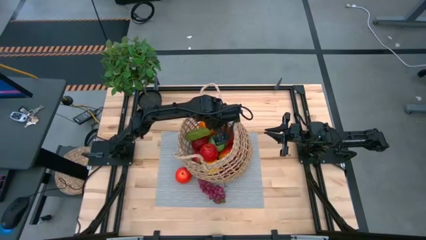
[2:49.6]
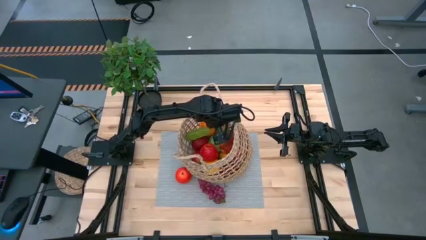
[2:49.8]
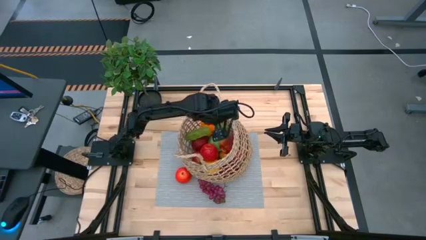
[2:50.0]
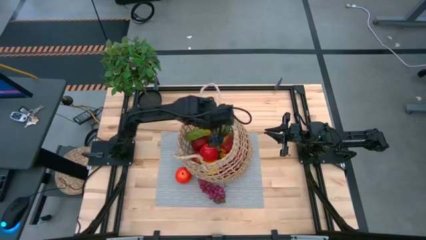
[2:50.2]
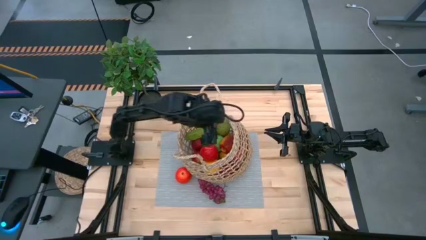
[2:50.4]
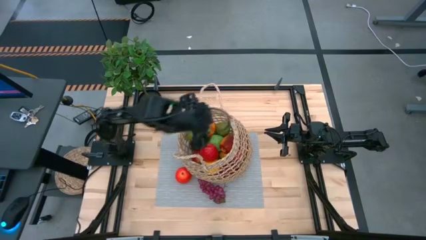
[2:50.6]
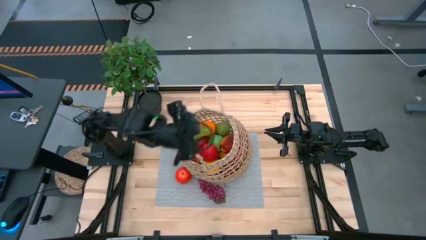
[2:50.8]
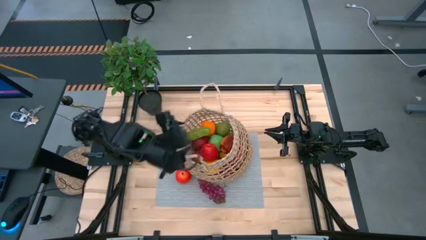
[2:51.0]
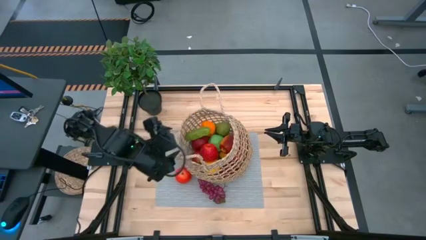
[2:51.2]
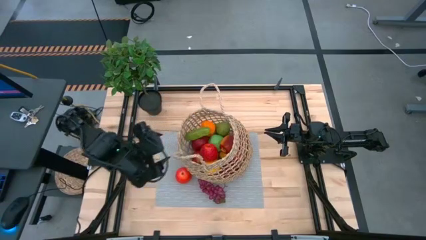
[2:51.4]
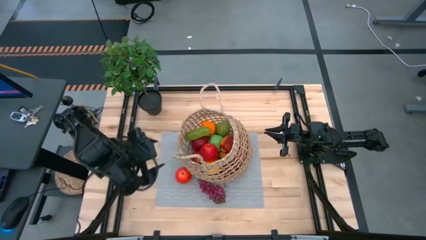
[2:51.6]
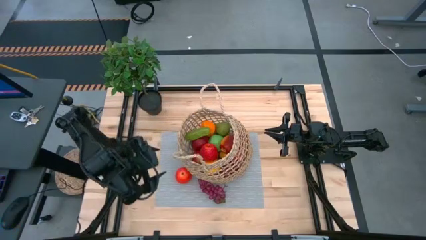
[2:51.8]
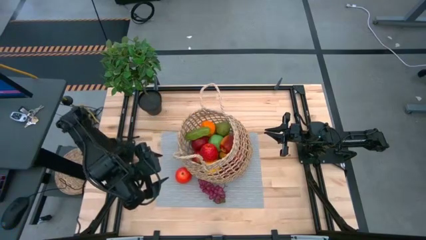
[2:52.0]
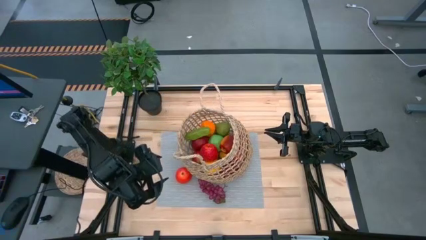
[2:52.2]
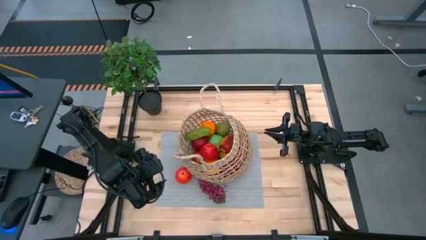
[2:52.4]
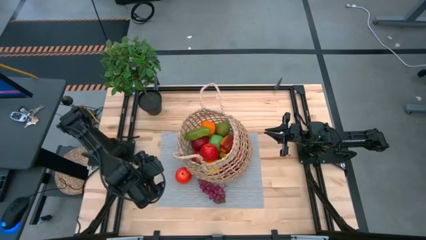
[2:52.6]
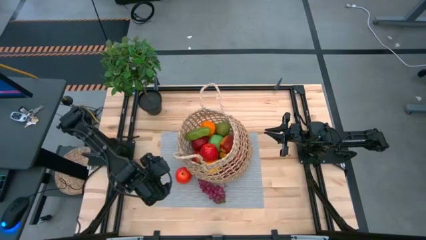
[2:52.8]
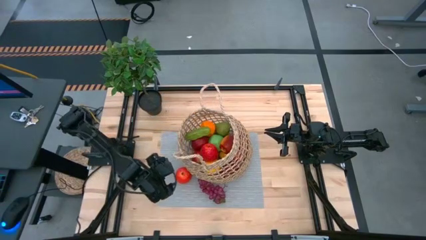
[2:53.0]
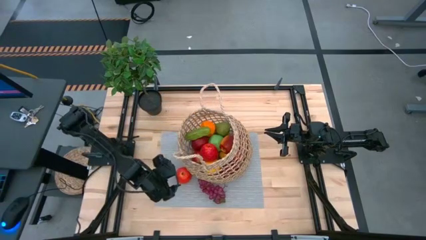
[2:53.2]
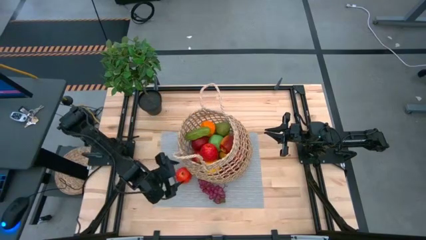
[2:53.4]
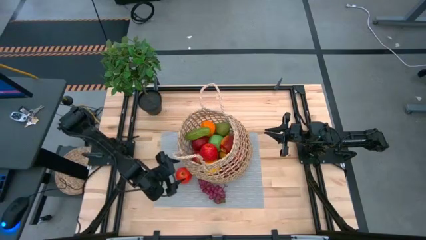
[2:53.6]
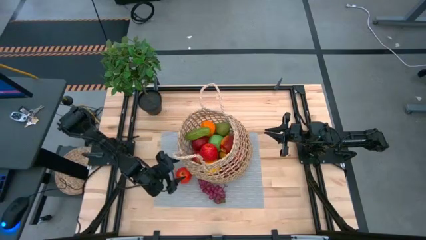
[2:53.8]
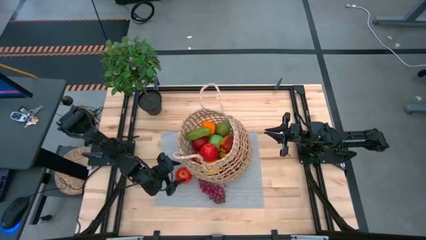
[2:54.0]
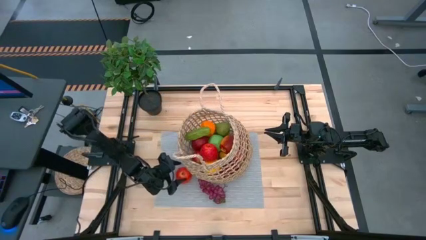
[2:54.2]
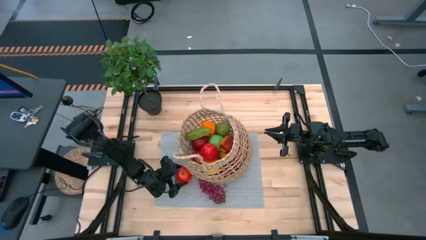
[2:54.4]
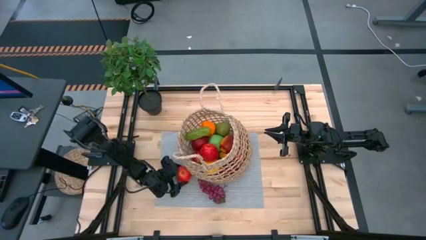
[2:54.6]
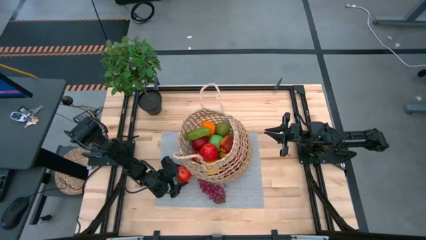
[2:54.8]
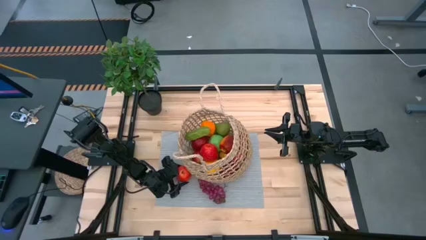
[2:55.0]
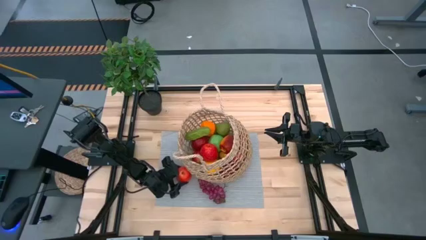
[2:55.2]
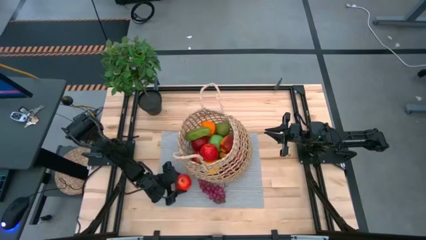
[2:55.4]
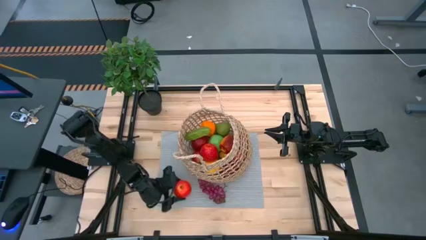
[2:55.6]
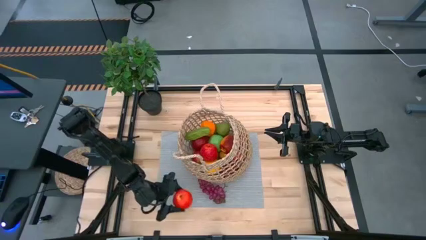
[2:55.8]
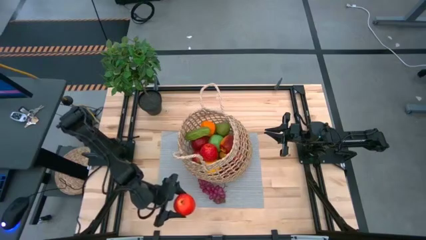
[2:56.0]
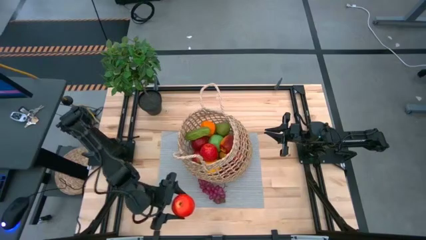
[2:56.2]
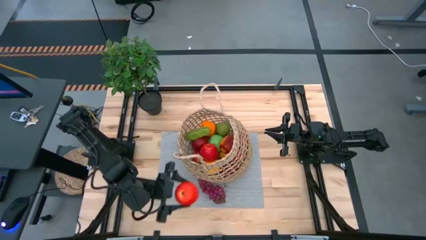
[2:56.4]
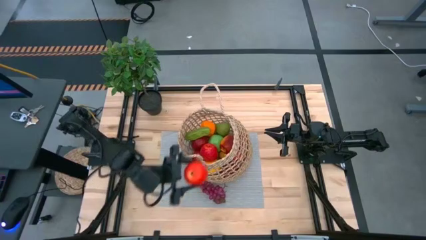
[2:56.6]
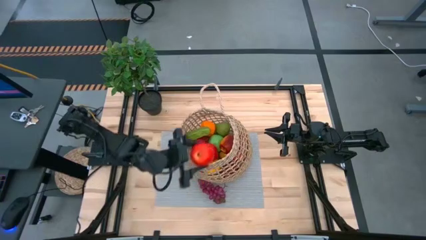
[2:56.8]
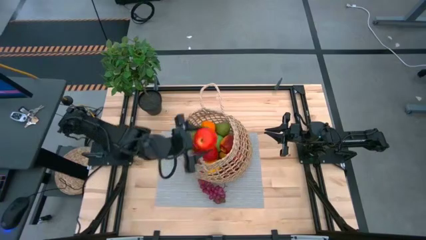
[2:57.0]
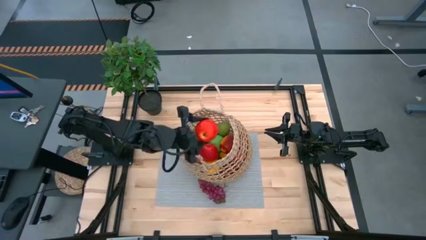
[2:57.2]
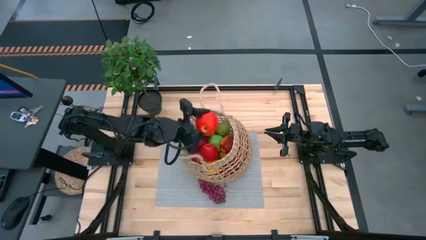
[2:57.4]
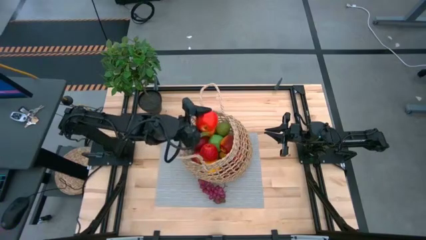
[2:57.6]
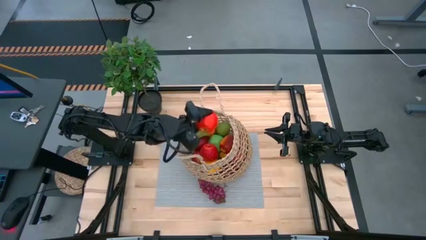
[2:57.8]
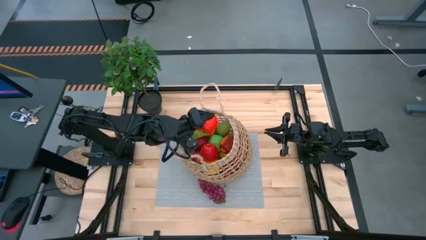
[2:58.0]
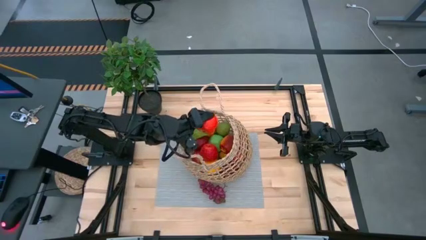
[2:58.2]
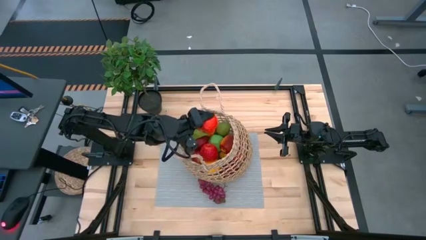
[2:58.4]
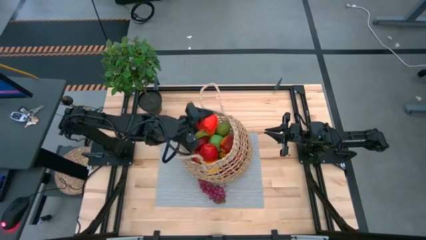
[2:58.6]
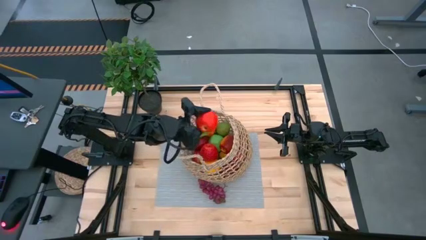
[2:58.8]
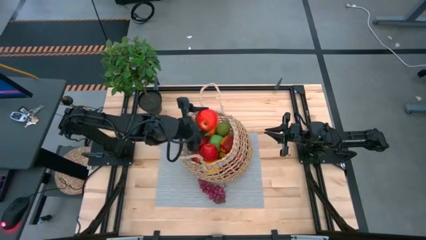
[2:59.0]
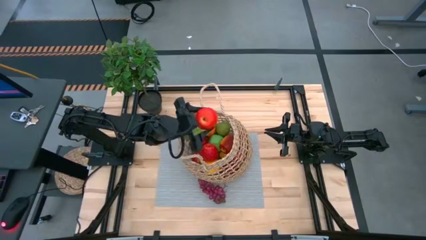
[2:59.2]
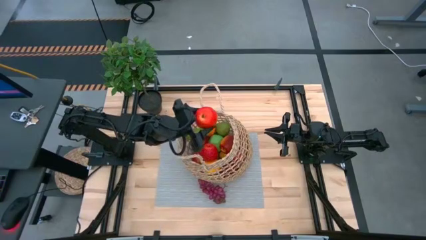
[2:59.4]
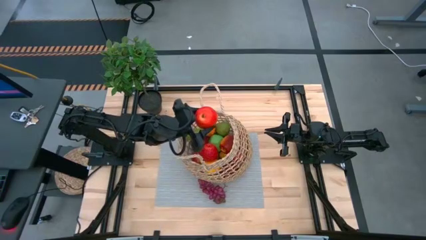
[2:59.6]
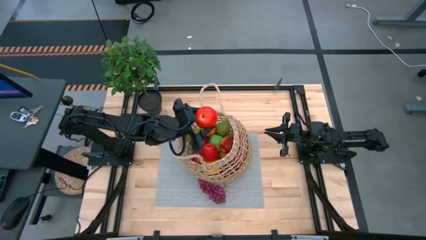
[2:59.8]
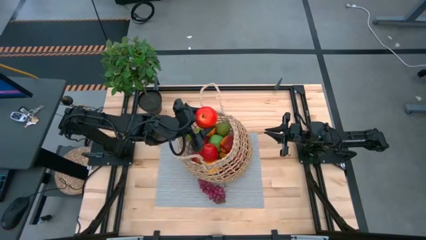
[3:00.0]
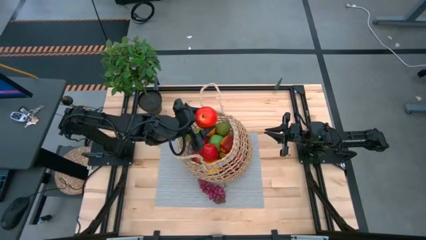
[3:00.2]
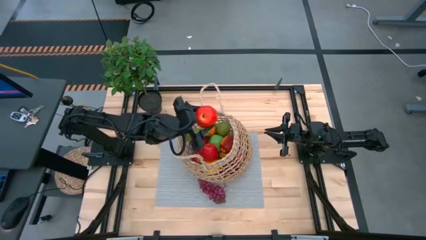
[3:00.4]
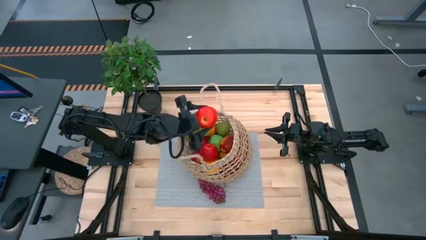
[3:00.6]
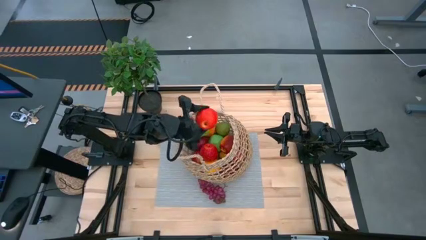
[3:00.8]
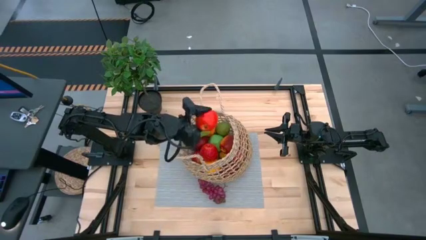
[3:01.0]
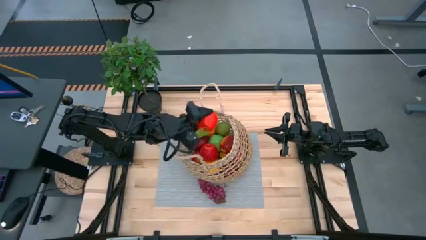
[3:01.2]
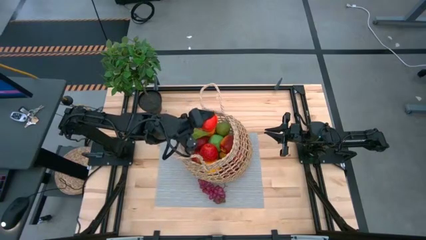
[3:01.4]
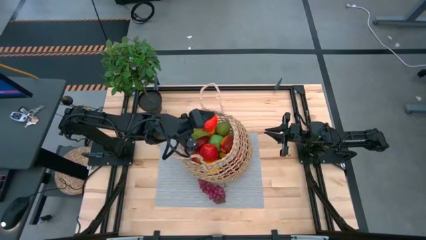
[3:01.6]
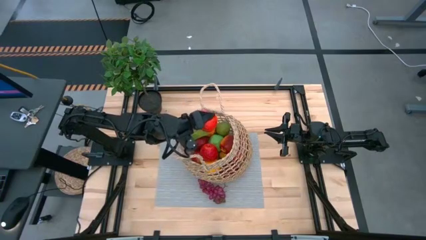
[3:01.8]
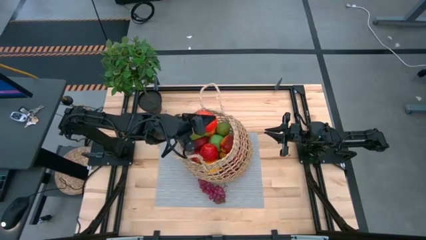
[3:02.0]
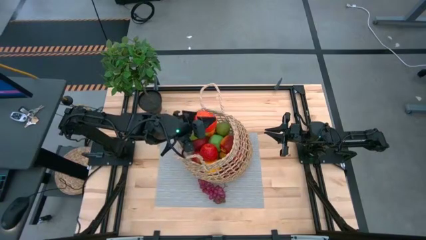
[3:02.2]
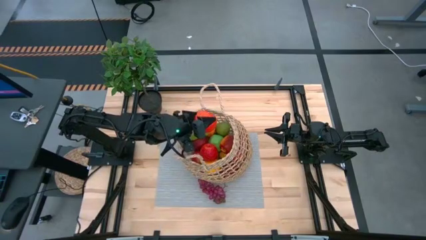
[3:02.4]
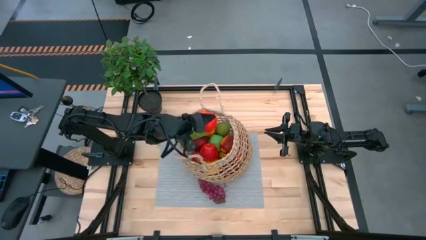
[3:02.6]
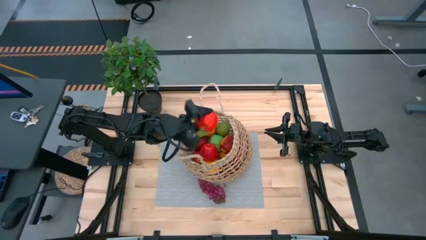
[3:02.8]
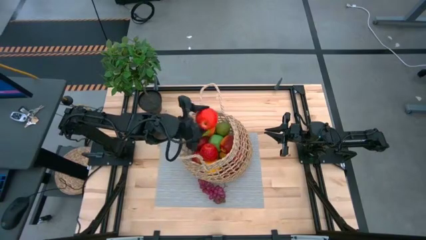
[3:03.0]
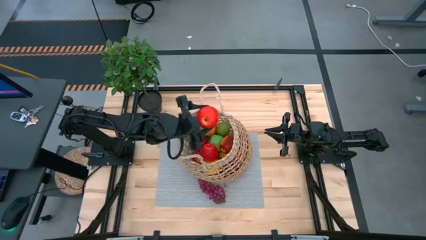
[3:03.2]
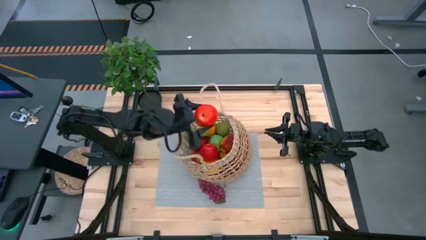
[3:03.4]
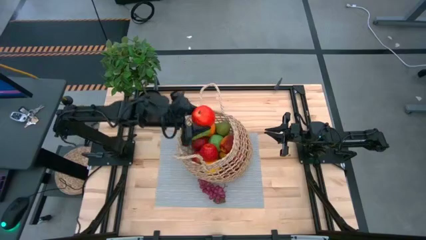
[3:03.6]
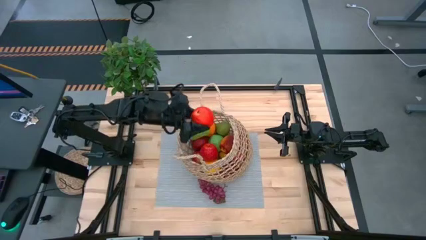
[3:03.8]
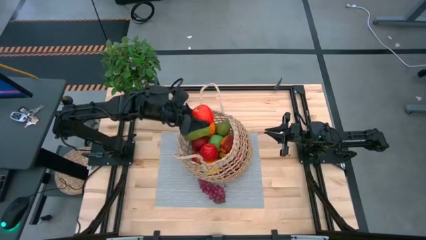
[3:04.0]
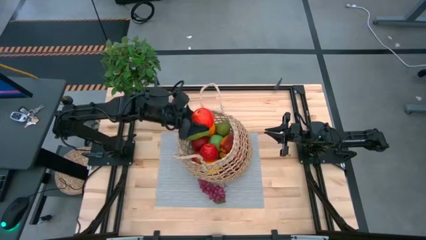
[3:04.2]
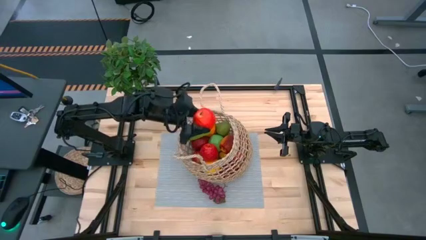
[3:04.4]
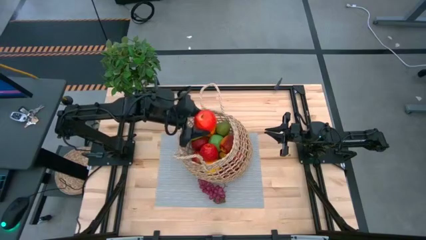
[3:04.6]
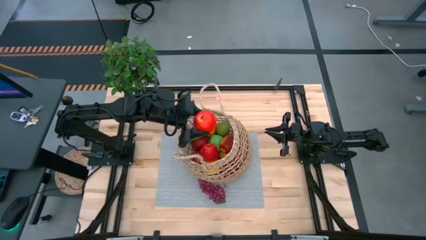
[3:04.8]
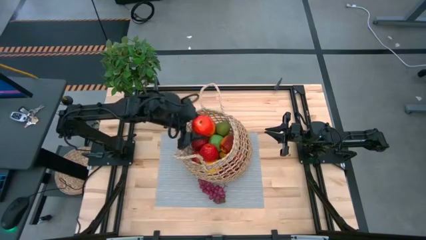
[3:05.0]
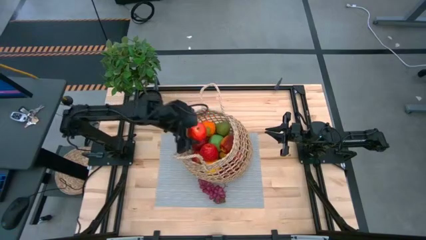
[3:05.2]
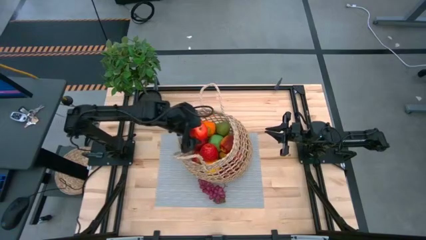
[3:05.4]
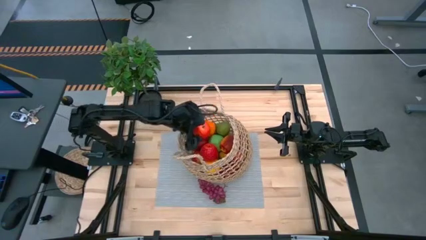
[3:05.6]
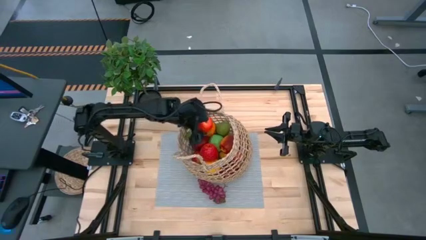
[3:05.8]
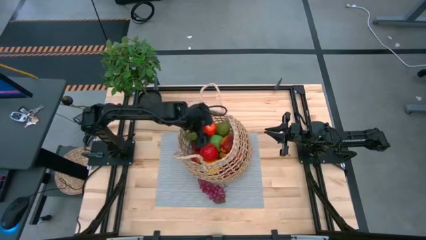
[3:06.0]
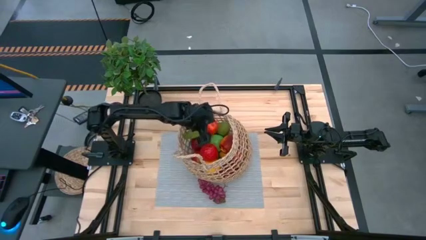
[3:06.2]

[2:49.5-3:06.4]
Task: Build produce basket
Put the red apple into the basket
